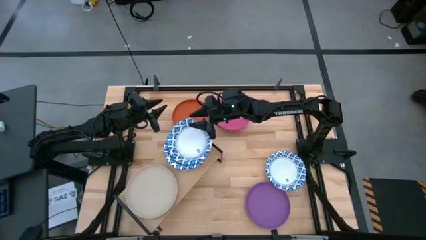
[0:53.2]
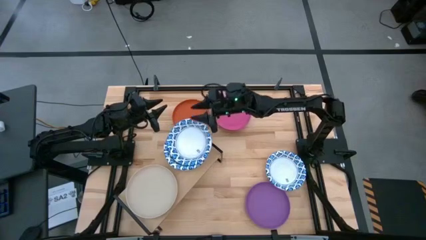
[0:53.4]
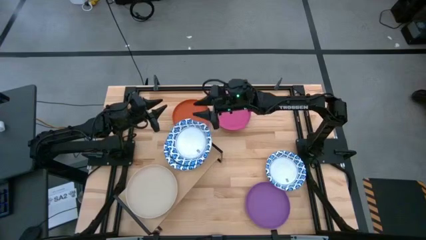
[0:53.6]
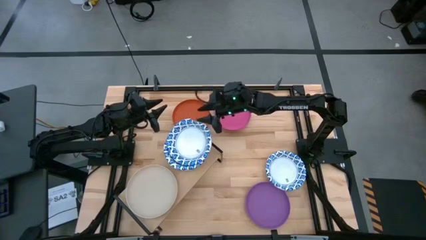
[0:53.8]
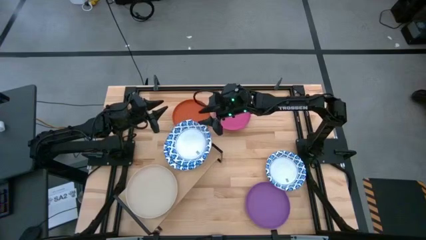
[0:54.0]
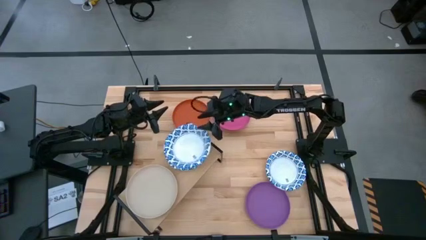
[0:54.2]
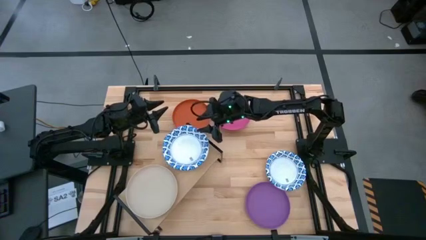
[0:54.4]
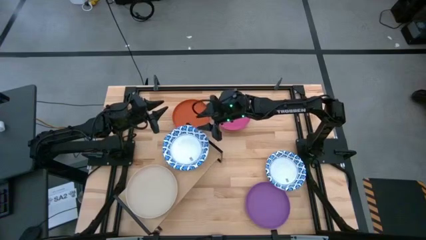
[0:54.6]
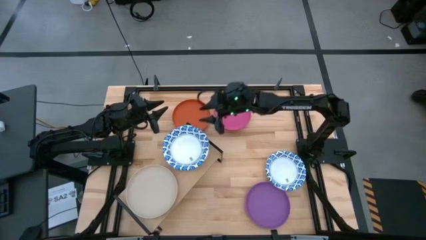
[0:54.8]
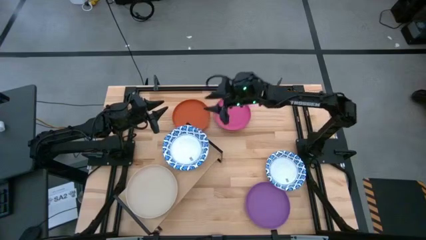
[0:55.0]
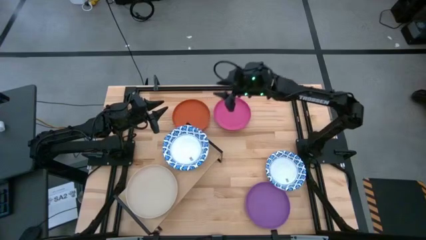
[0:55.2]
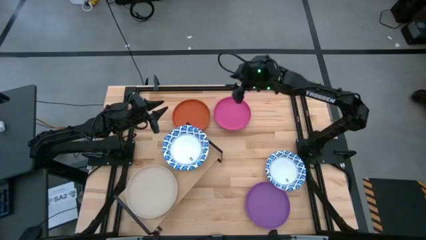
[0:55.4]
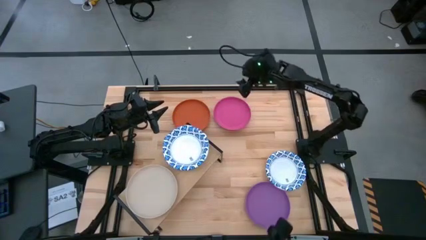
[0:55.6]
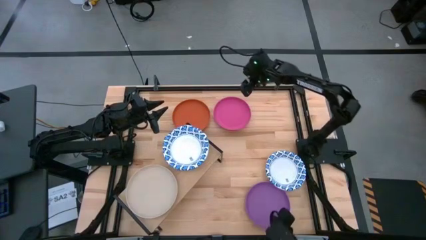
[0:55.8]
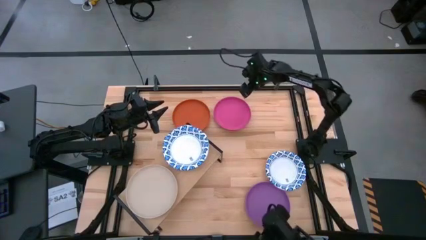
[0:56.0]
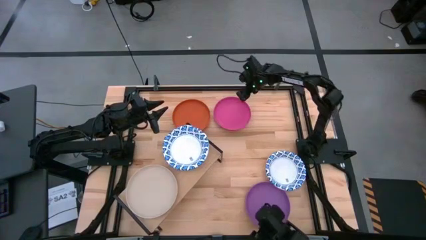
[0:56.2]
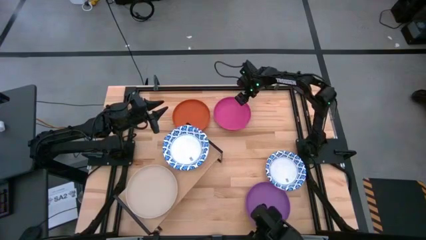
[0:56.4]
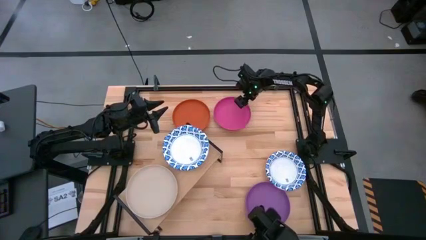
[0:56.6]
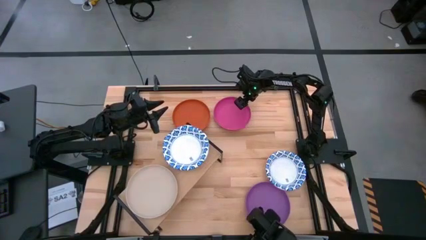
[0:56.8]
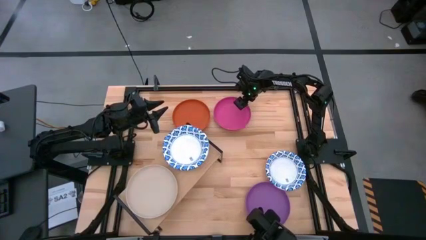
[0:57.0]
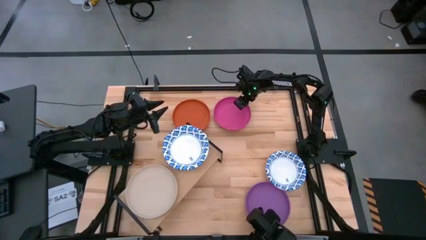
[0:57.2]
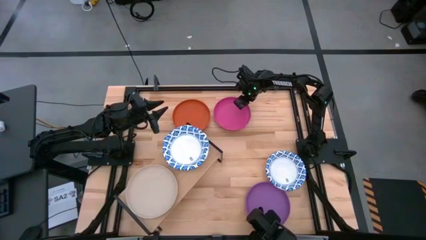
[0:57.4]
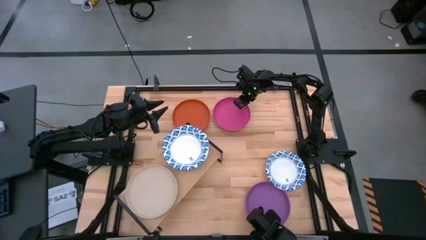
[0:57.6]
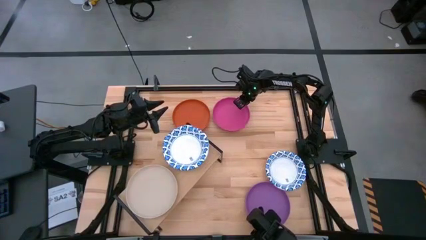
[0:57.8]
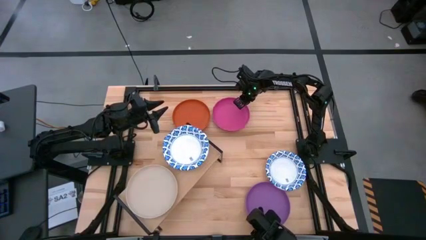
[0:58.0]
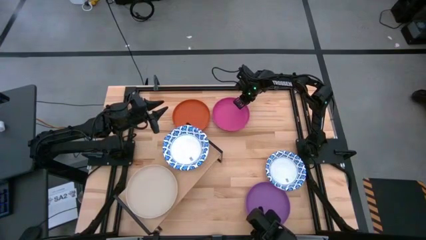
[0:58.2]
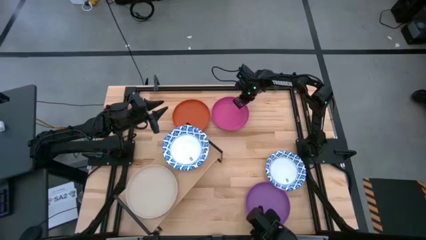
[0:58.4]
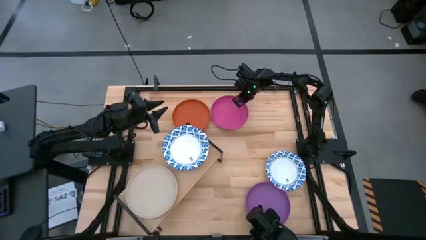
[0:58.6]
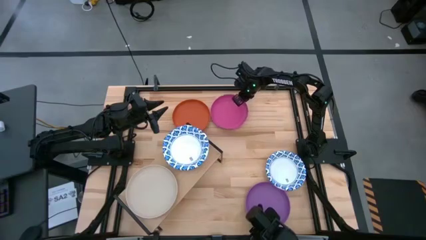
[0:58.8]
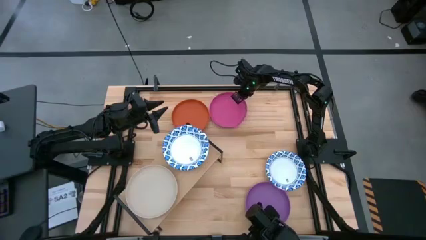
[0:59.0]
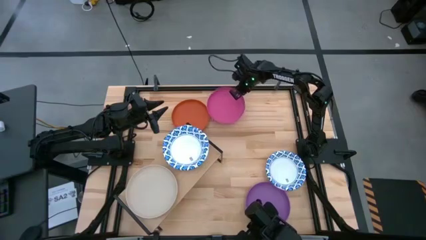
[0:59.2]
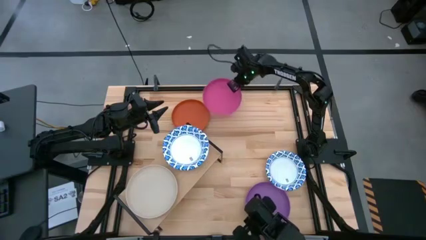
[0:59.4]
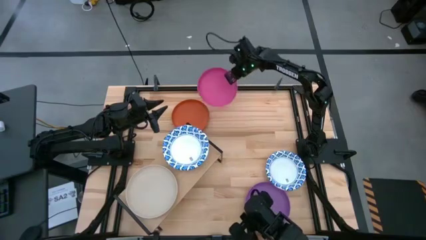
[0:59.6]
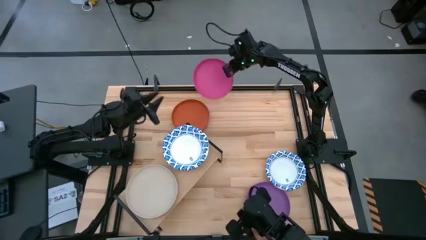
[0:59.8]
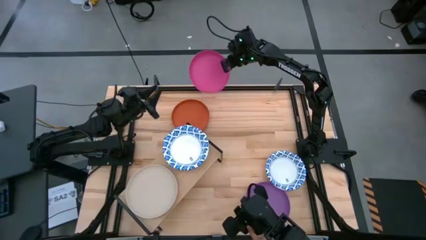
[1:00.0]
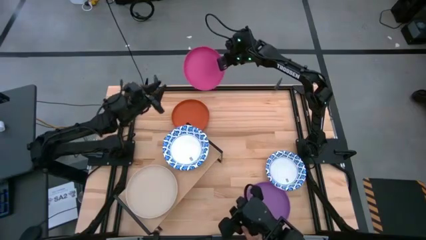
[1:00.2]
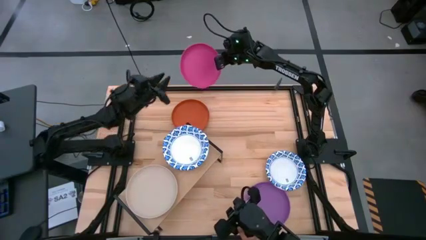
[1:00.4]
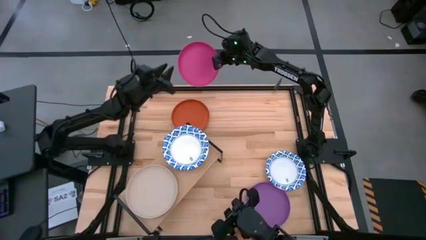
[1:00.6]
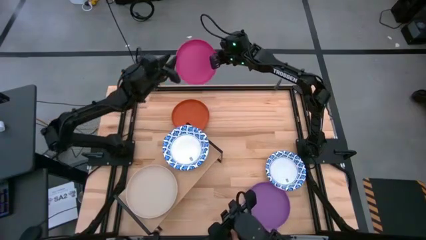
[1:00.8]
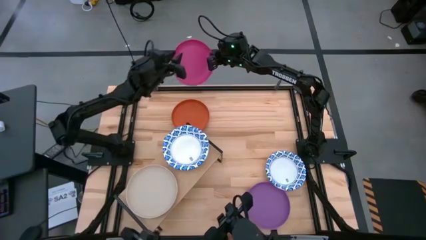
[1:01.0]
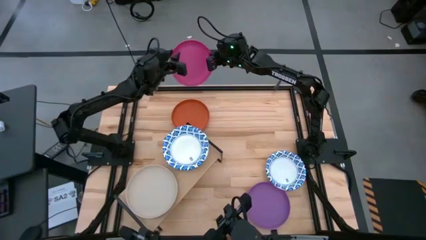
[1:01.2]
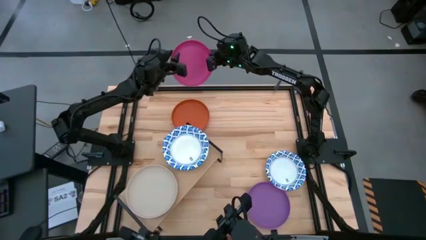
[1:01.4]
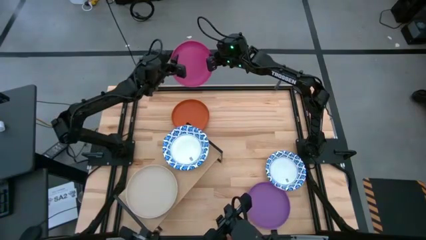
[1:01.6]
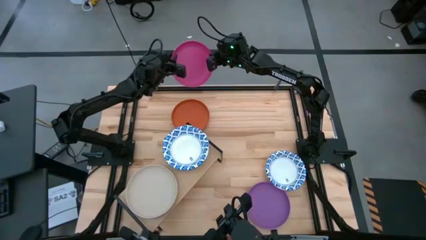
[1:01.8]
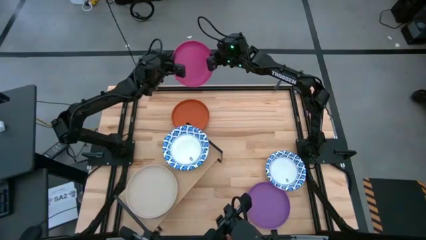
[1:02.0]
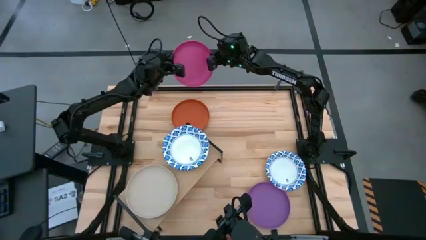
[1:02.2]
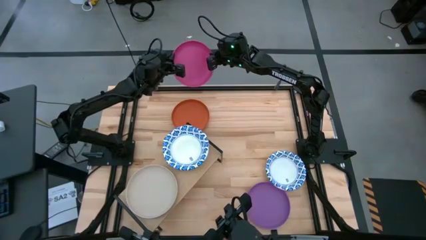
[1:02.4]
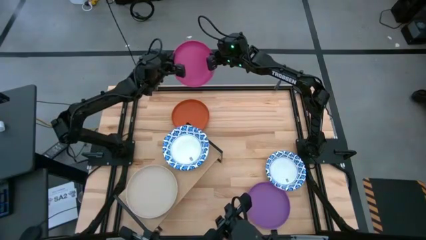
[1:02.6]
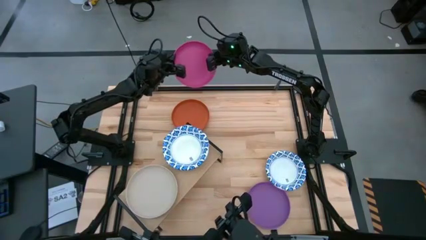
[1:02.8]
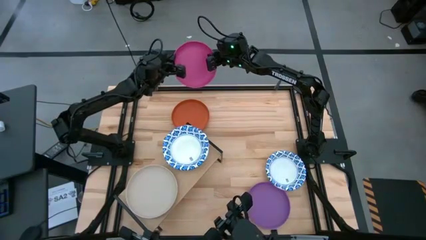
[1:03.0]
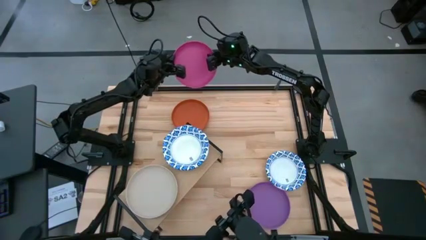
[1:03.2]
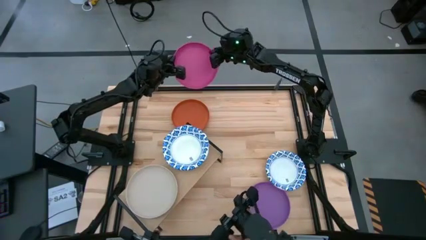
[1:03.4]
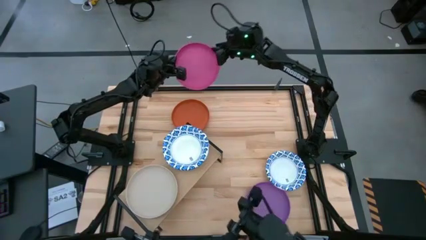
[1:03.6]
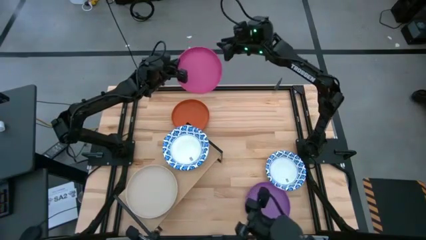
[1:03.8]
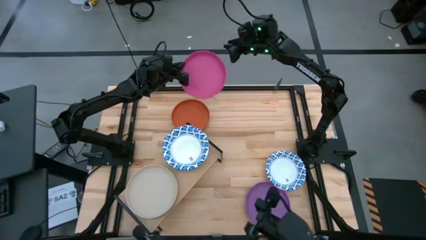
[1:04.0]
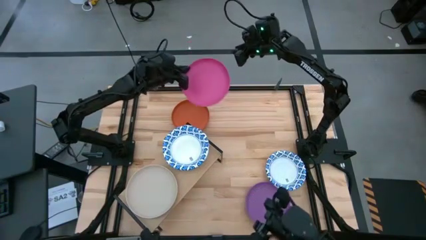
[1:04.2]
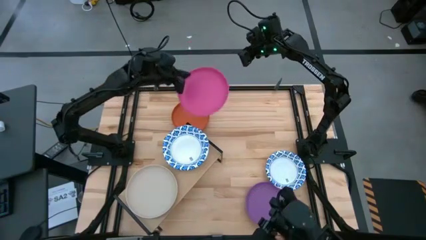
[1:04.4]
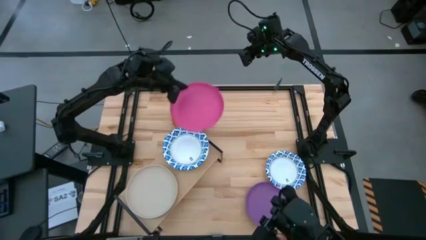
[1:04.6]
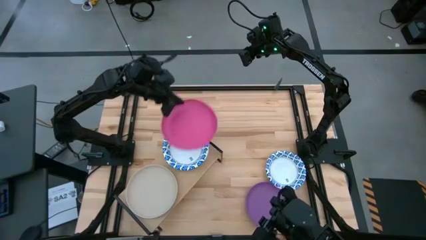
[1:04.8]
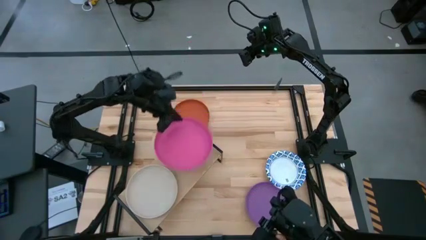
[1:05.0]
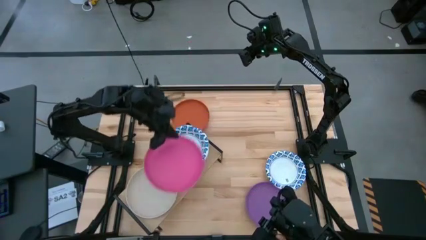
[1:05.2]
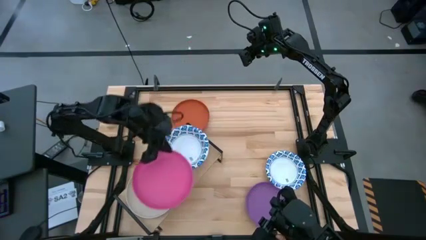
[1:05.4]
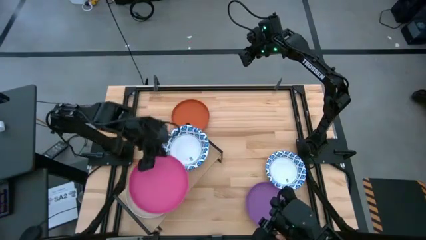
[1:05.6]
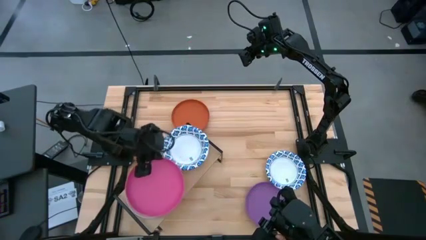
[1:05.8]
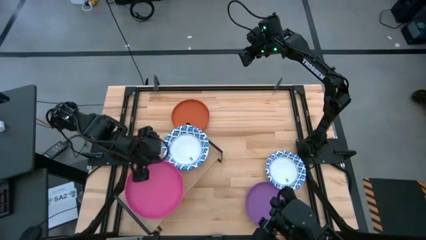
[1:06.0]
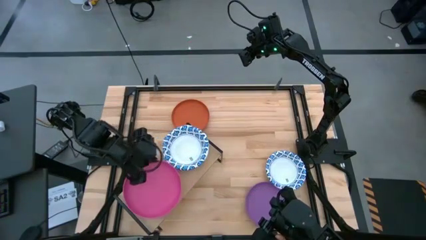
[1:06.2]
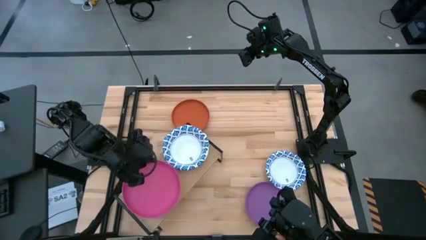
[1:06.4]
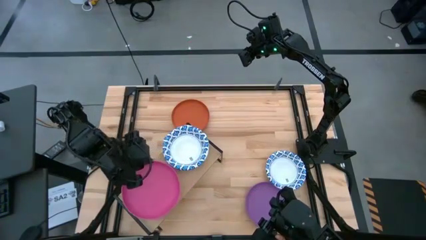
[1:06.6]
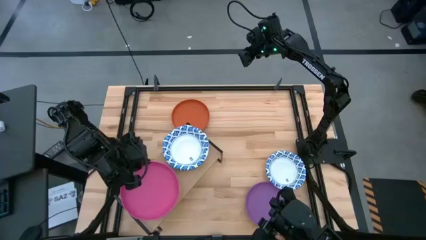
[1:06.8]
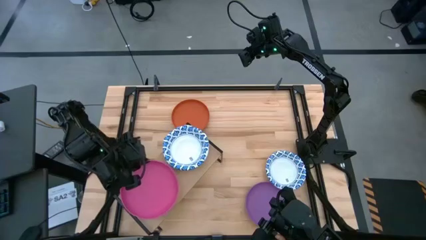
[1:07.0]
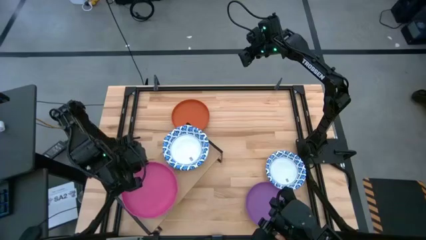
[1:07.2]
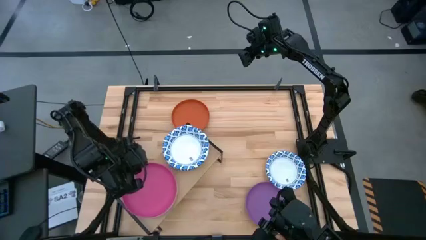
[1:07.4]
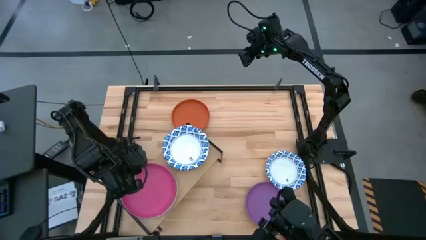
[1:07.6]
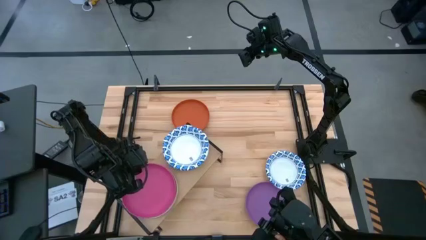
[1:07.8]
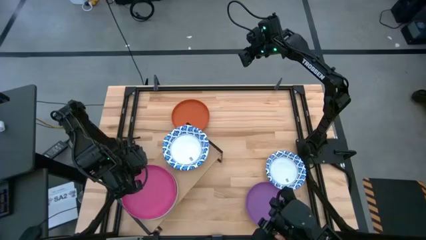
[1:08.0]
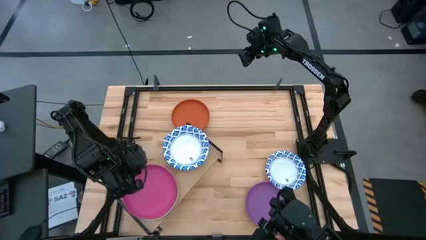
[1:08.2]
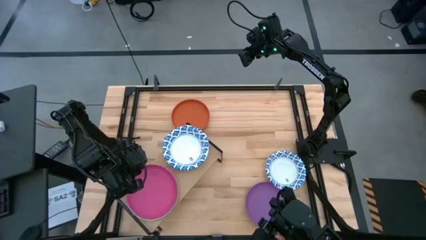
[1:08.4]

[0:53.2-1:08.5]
Task: Place and stack plates onto a shelf
Stack the pink plate on top of the light brown plate on the shelf

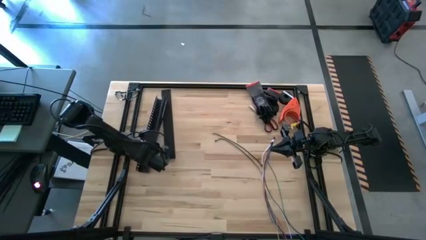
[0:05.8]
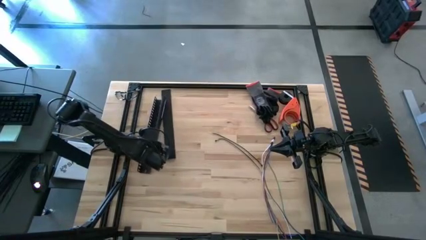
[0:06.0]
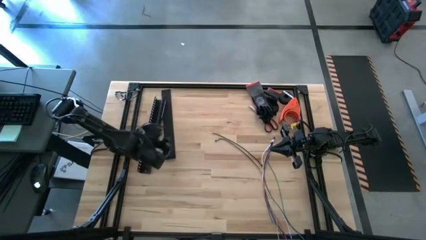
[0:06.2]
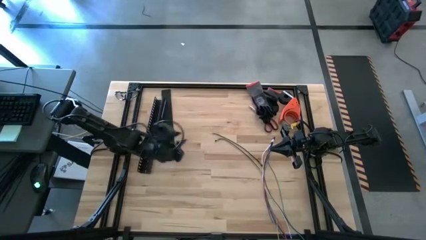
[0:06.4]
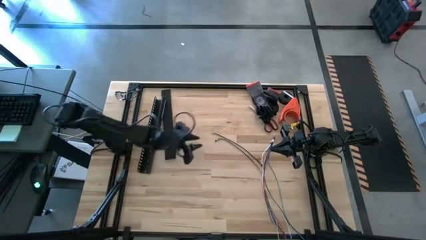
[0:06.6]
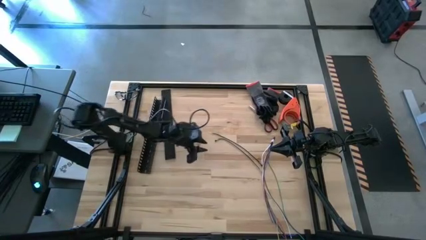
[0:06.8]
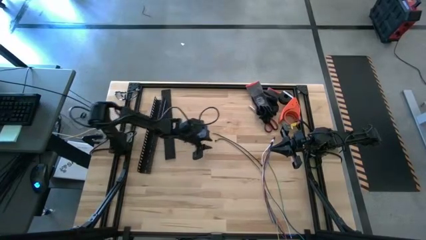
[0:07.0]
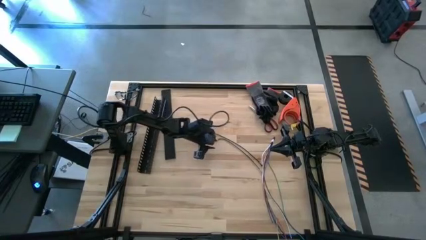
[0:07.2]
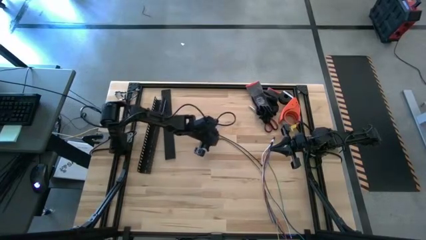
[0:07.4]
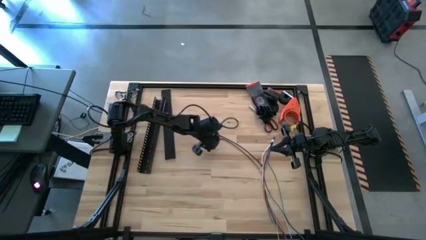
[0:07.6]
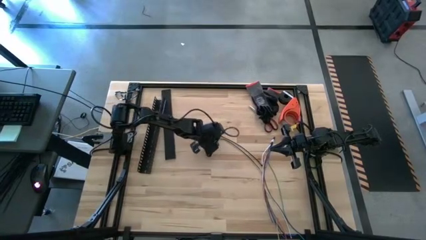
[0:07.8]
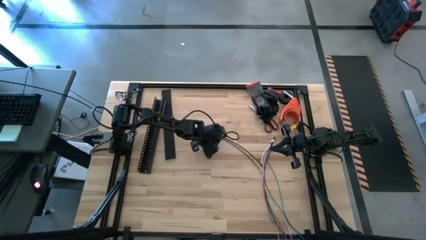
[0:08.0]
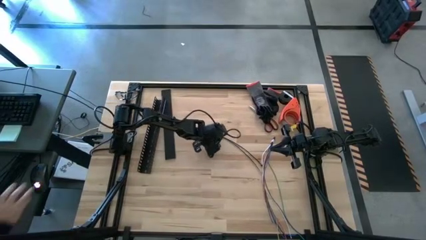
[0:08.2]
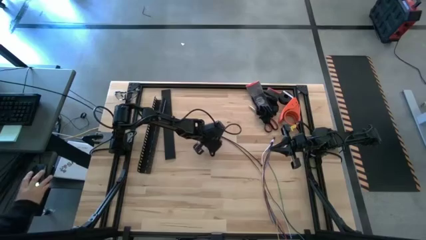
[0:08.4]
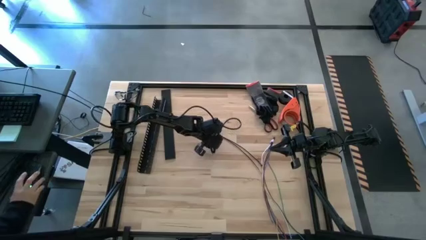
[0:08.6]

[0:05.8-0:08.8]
Task: Ziptie cables
Prepare the left black zip tie
